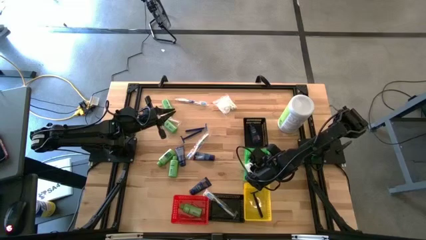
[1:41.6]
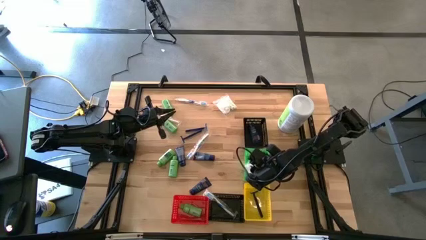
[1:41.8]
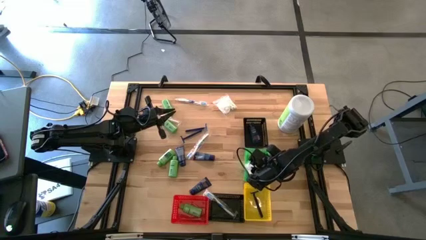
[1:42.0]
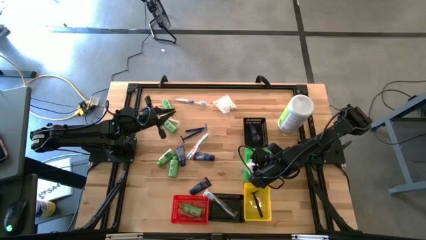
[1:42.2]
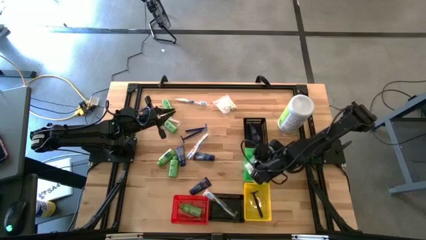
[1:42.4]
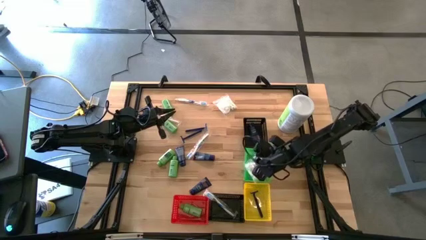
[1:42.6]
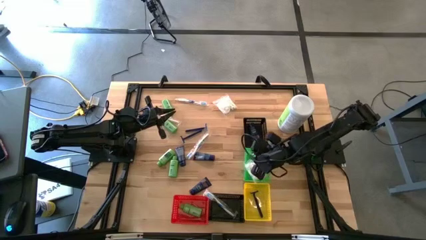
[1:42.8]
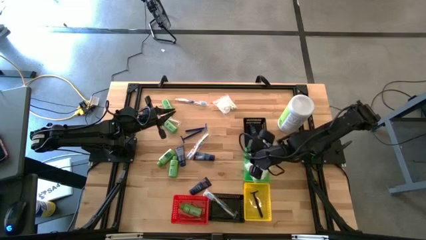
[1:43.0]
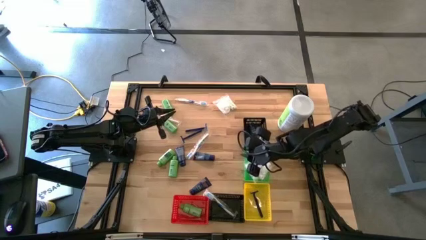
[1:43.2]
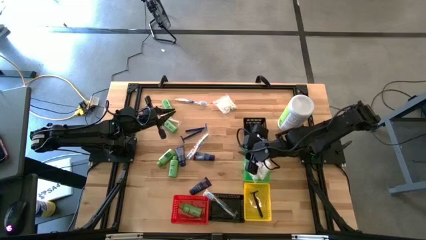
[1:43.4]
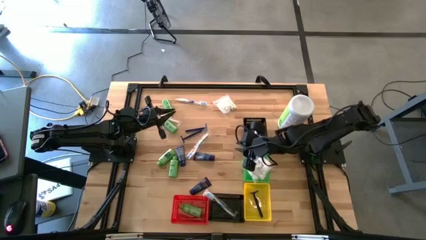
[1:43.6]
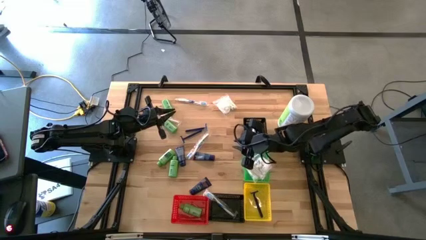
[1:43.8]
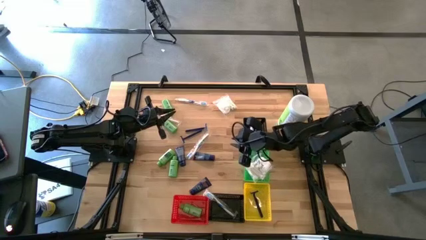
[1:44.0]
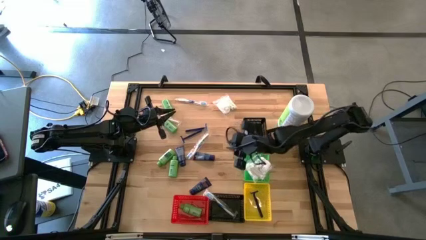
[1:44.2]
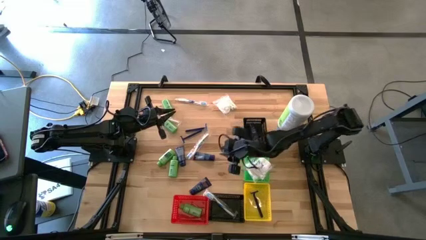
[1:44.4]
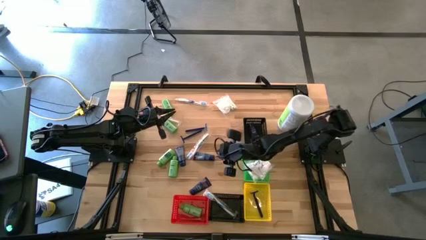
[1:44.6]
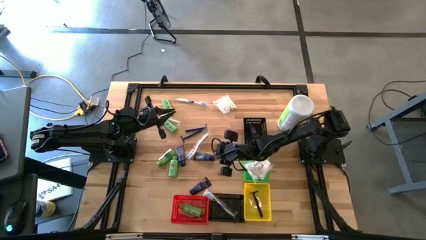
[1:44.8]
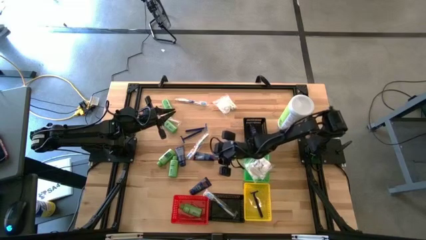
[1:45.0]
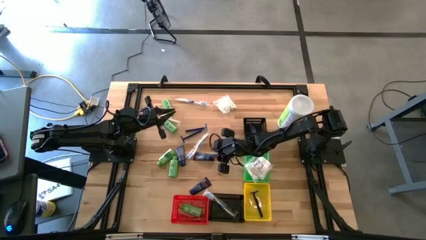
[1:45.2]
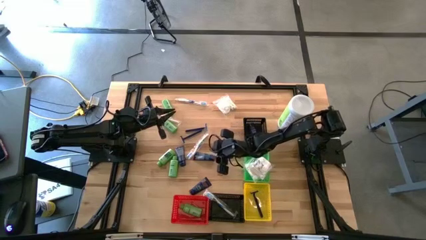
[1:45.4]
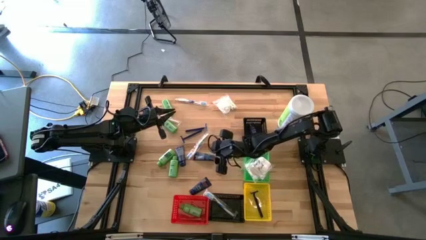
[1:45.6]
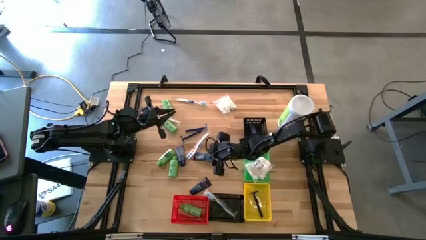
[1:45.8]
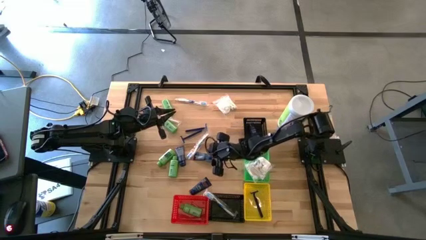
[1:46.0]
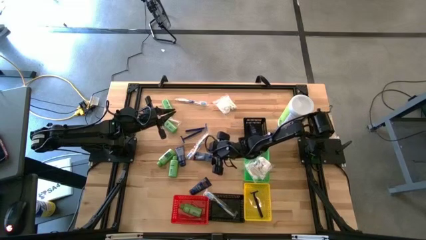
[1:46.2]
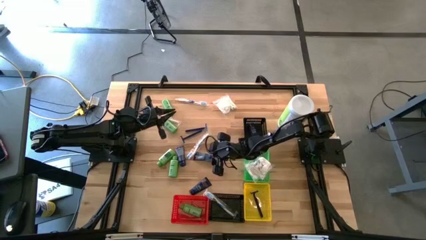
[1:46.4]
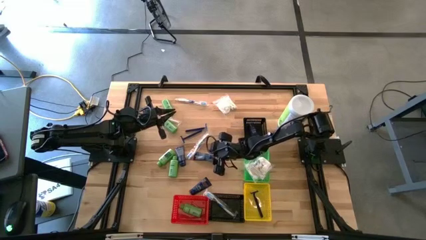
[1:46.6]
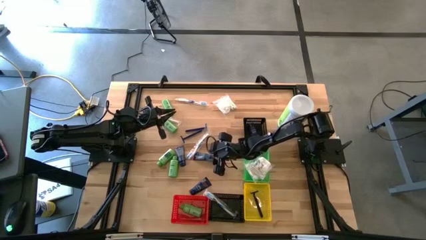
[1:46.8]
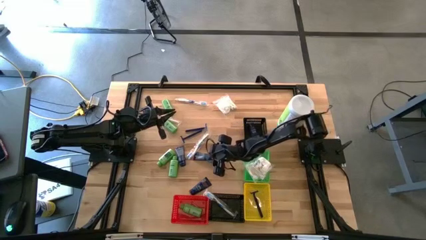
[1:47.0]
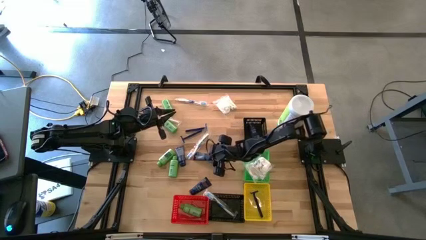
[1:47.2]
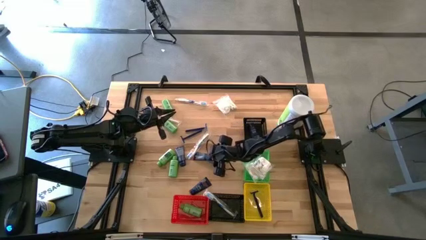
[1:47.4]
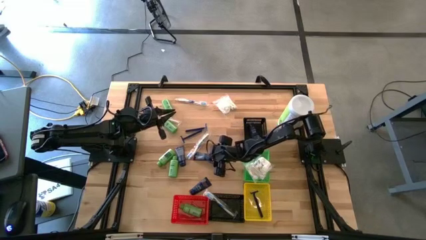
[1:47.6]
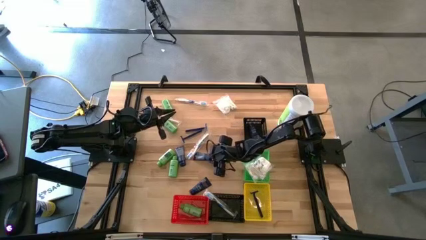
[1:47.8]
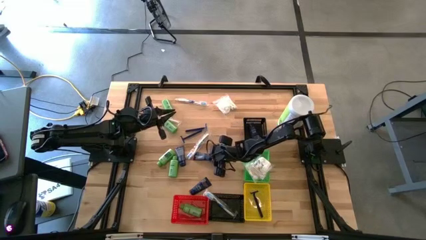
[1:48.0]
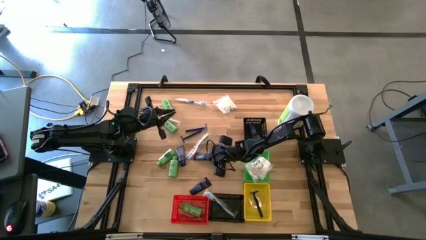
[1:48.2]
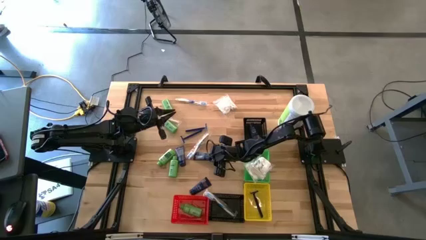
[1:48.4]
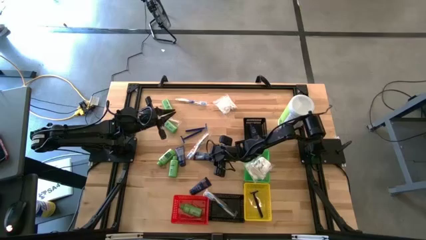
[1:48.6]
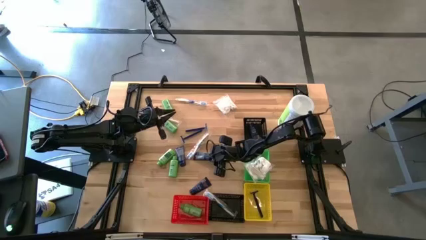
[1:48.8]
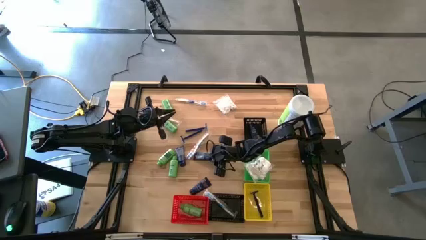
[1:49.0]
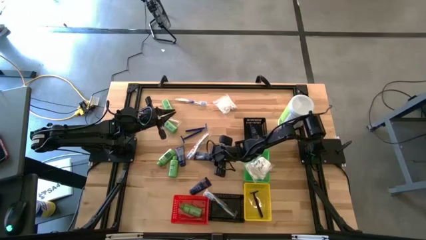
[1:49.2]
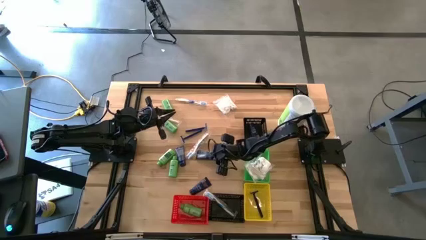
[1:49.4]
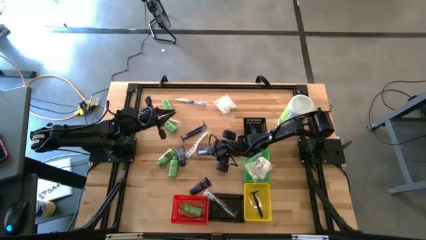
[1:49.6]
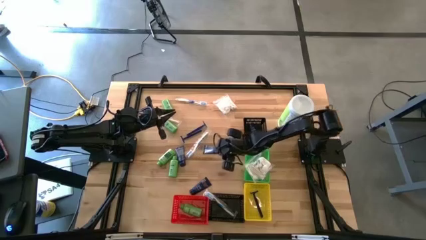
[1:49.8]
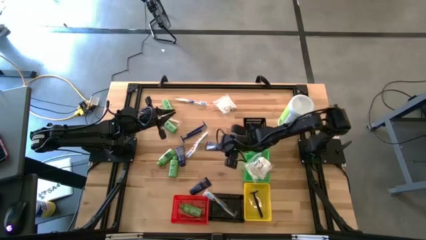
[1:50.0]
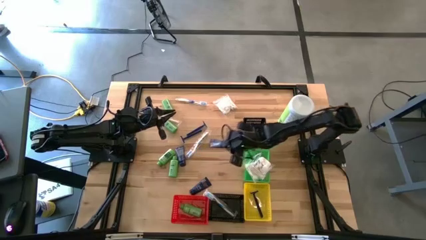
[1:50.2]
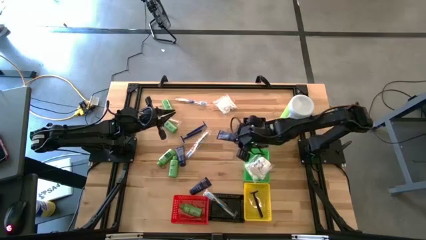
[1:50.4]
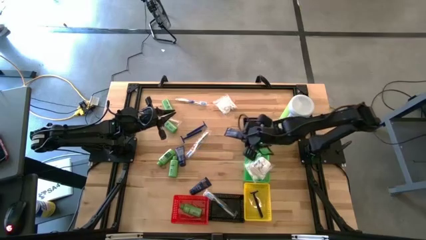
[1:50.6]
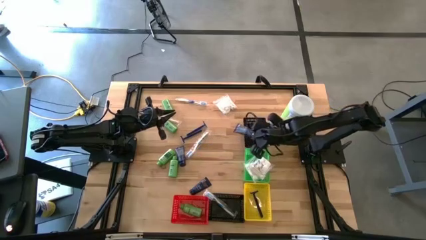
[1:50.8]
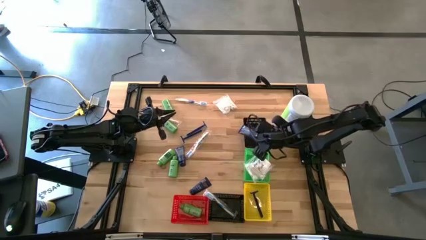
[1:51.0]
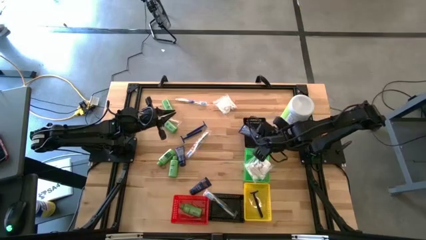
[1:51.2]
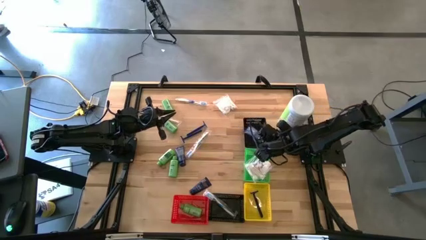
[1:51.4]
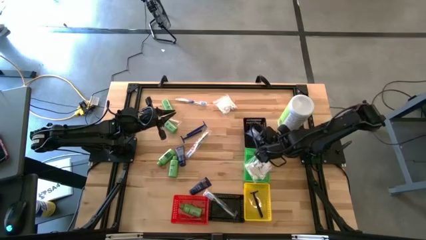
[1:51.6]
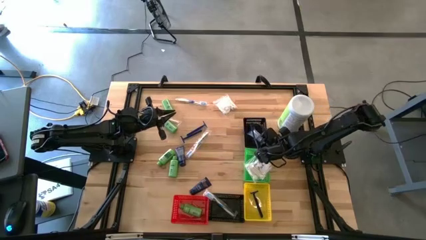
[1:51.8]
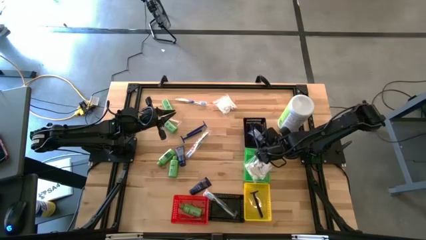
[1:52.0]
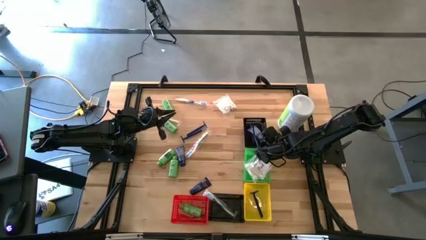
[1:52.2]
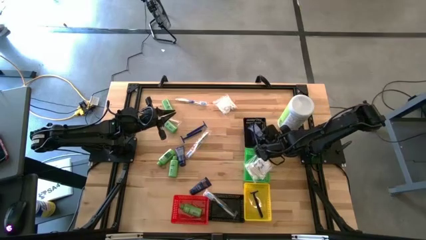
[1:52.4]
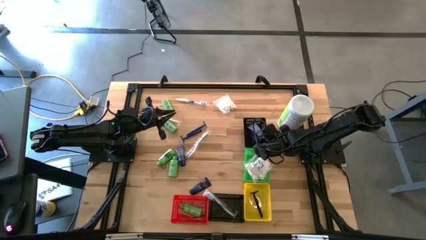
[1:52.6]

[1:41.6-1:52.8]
Task: Pick & Place Travel size toiletries
Put the blue shaving cream into the top black bin

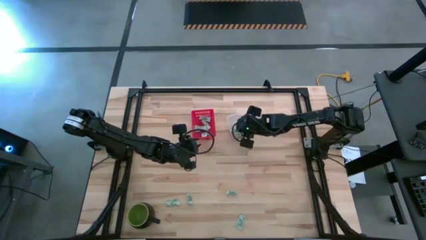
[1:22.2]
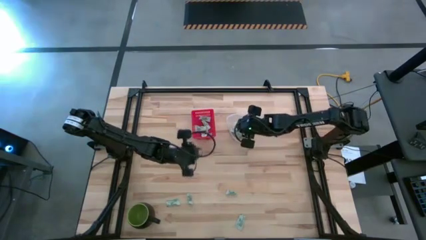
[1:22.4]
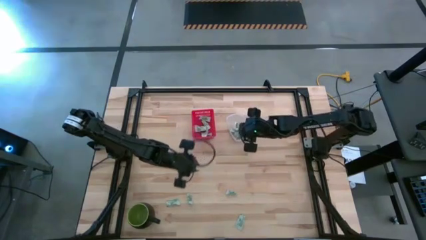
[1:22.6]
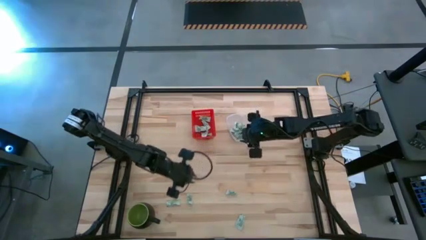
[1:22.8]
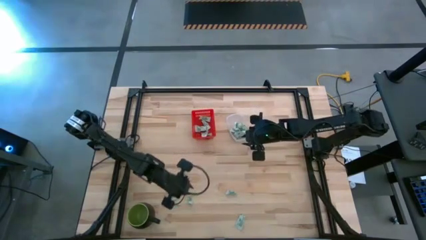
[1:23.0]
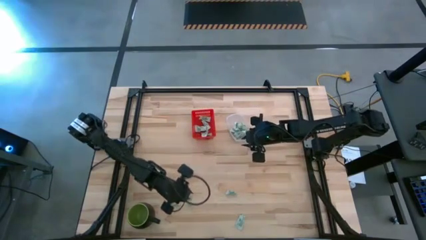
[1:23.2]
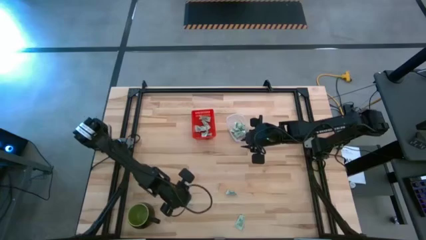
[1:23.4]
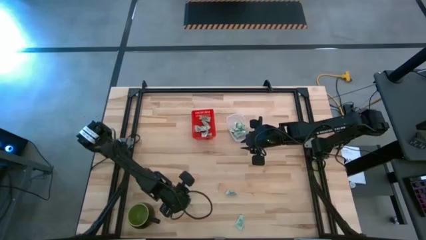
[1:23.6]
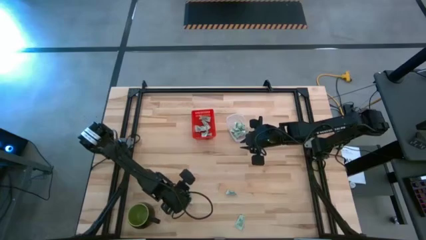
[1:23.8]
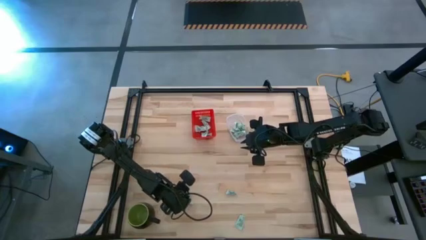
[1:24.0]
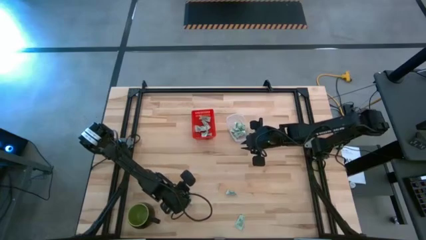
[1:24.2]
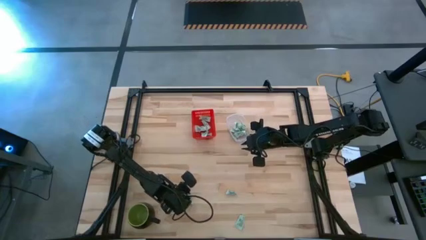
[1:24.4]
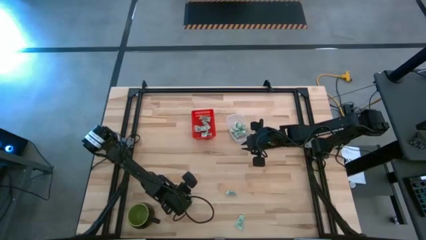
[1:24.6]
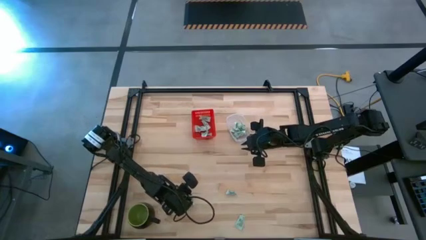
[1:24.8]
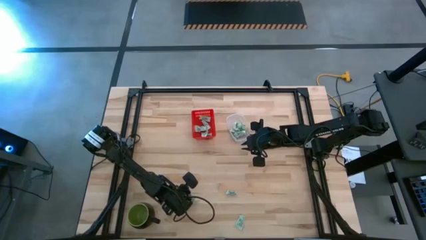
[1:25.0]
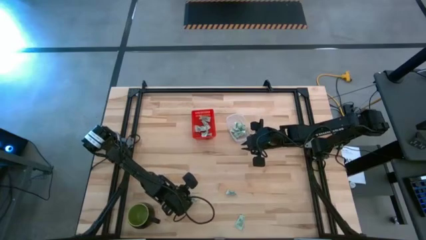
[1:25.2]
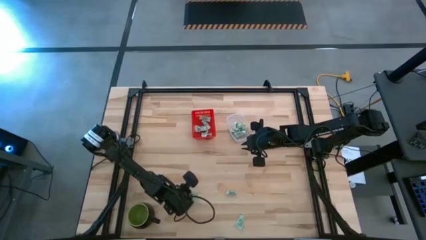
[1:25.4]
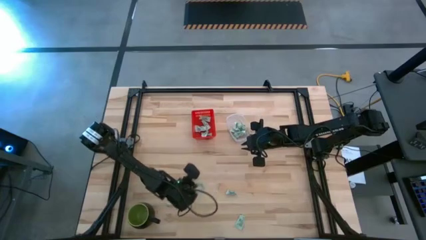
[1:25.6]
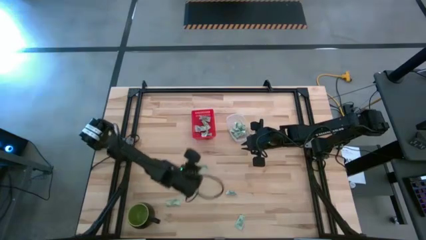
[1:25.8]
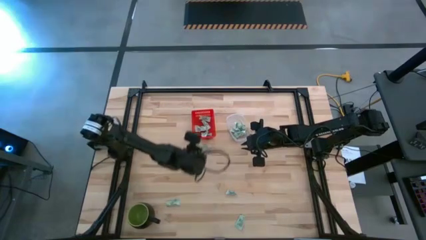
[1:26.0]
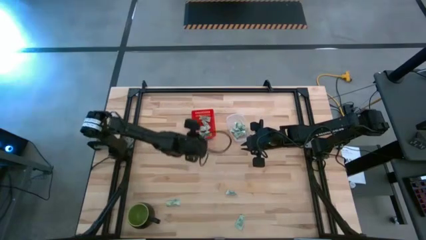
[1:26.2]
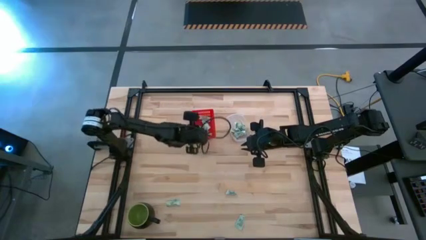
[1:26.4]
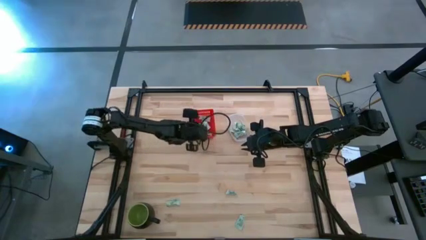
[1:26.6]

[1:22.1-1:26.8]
Task: Pick and place items into bin
Put the white stevia packet into the red bin
